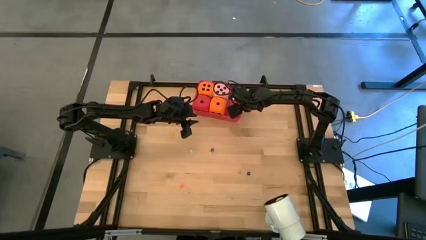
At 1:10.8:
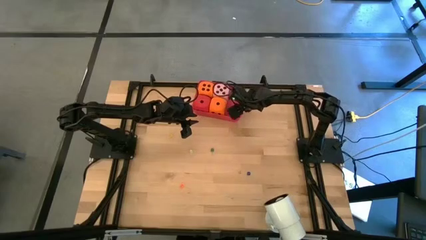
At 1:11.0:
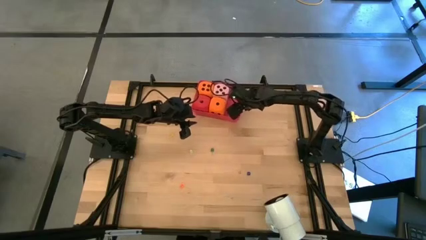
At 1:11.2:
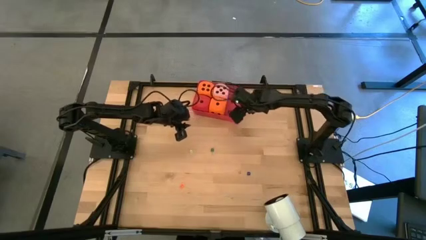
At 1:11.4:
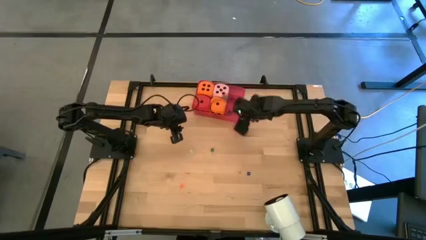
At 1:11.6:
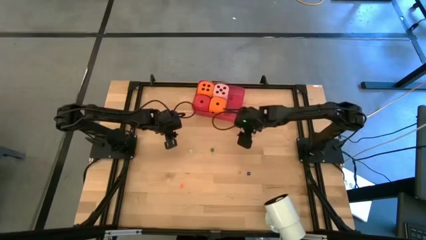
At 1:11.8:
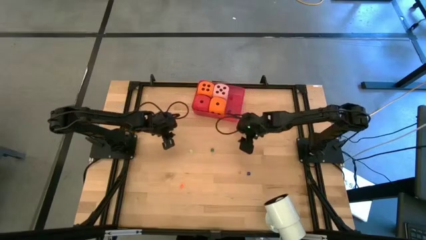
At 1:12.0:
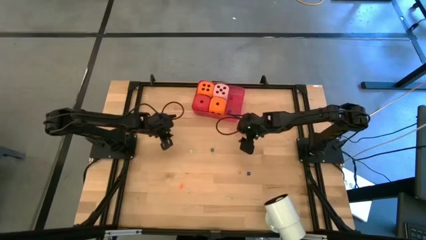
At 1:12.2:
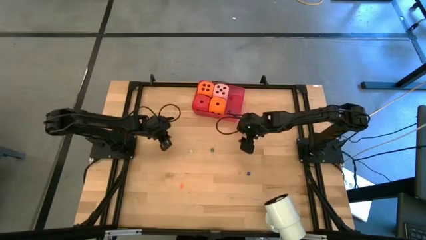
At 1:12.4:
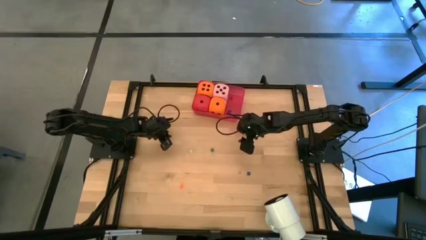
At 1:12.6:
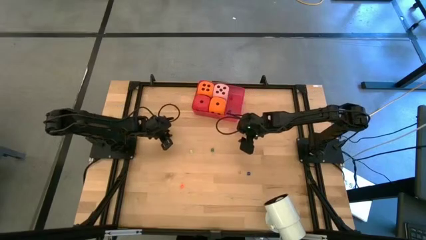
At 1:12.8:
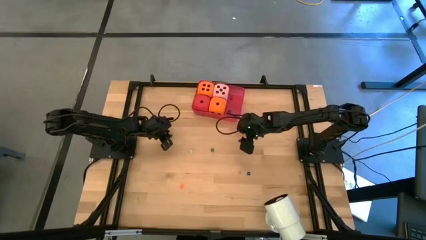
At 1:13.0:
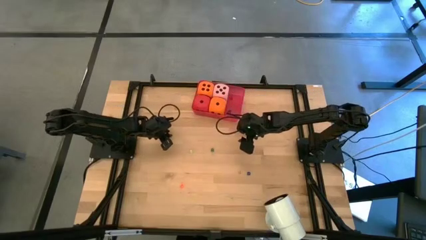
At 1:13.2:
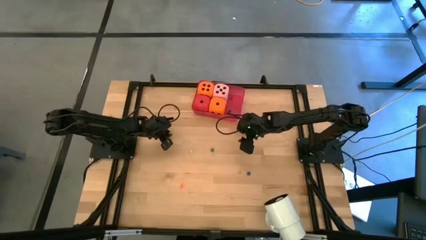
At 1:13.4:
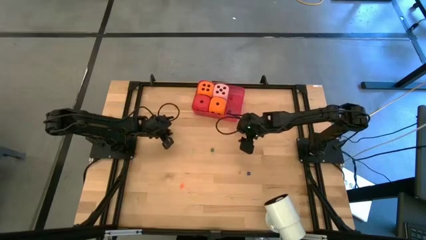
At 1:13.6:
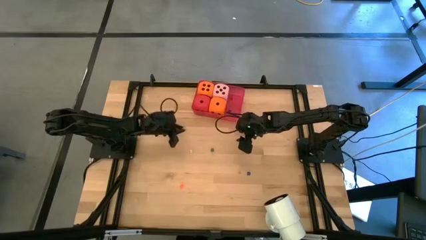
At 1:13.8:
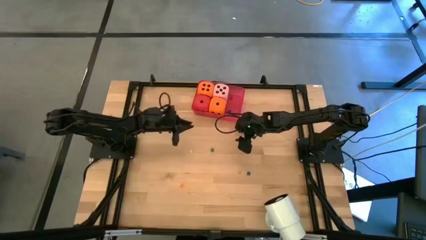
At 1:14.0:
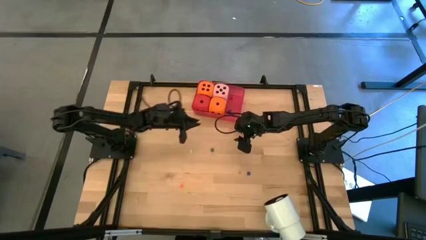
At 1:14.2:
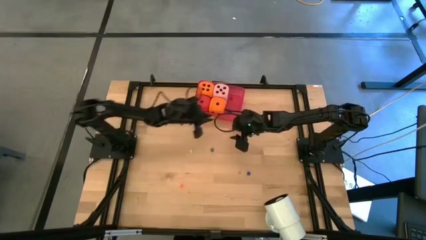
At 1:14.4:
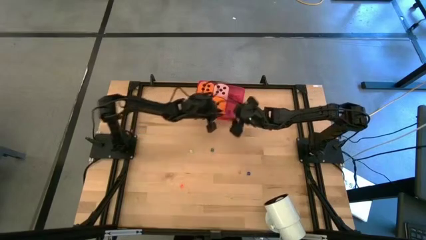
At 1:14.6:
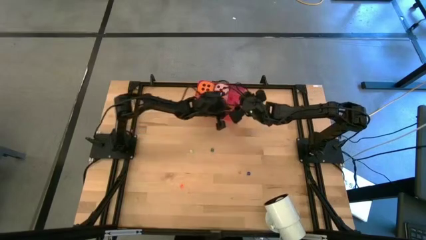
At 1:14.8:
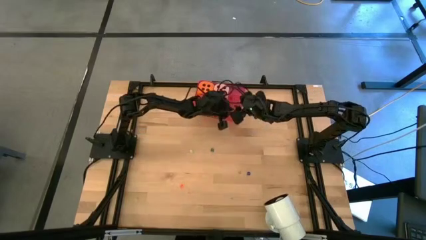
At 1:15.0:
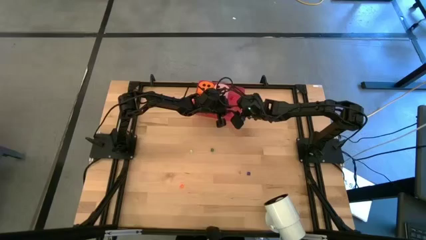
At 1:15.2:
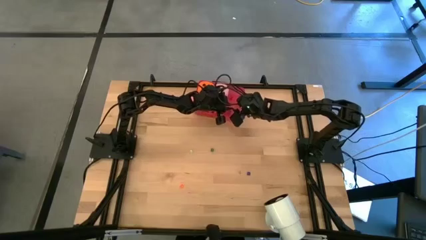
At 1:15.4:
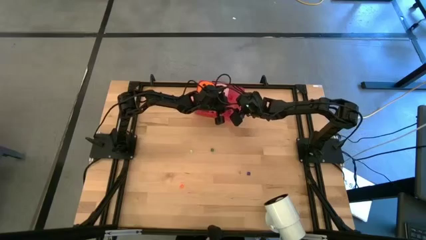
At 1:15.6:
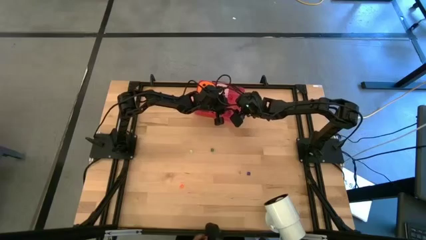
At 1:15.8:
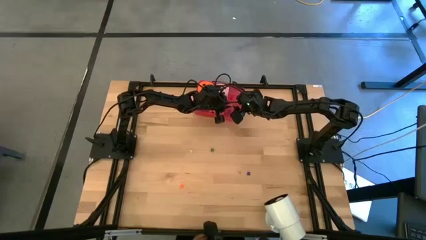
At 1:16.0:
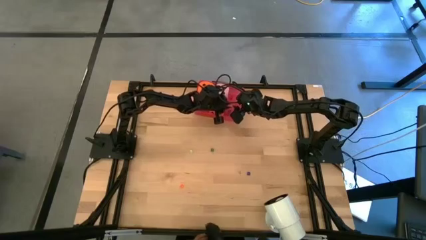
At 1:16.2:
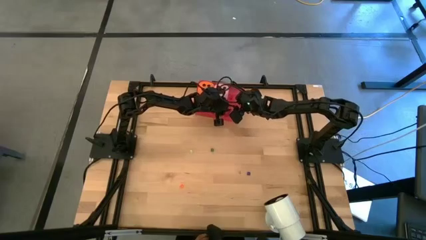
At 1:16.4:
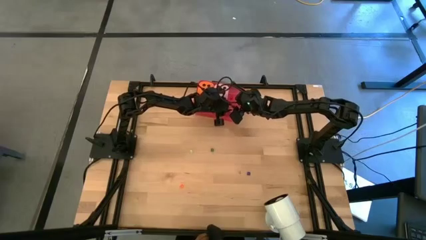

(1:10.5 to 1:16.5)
Task: Pick & Place Dice
Put the small yellow die into the red bin

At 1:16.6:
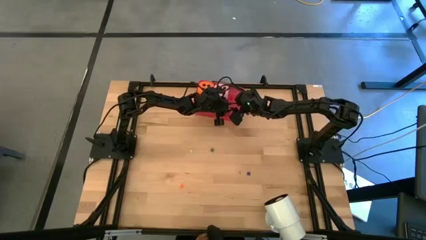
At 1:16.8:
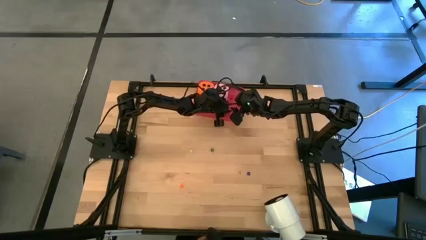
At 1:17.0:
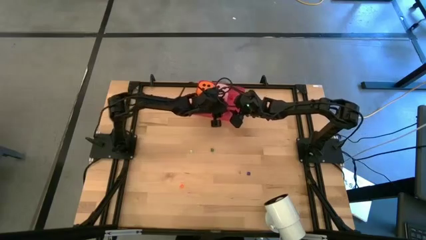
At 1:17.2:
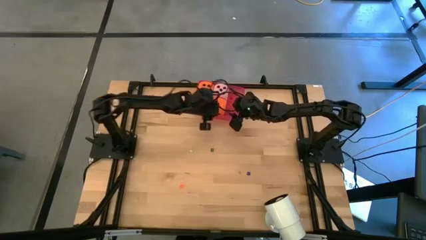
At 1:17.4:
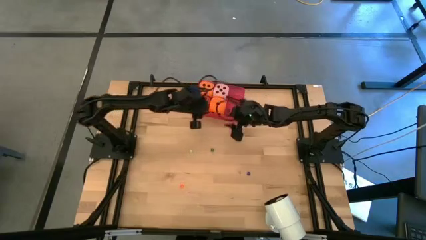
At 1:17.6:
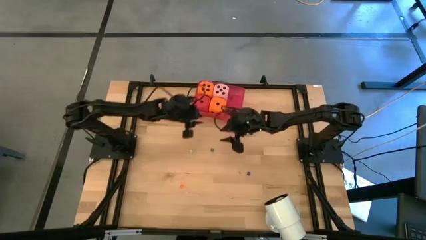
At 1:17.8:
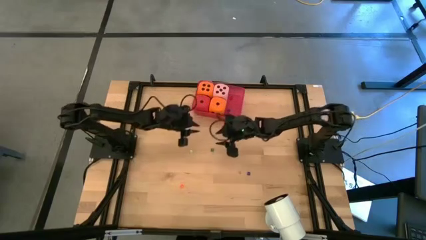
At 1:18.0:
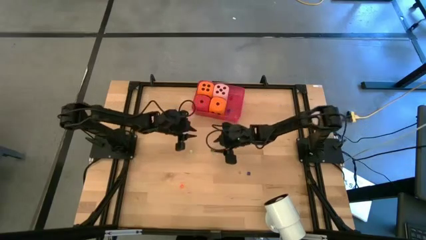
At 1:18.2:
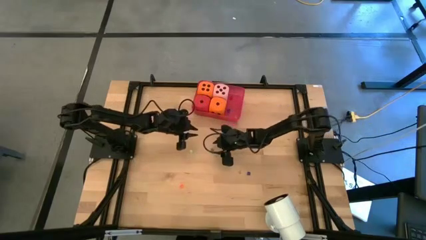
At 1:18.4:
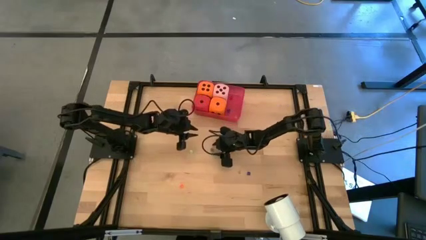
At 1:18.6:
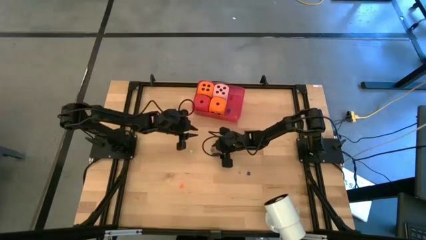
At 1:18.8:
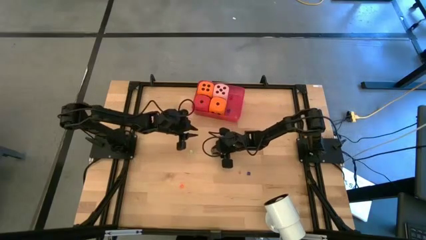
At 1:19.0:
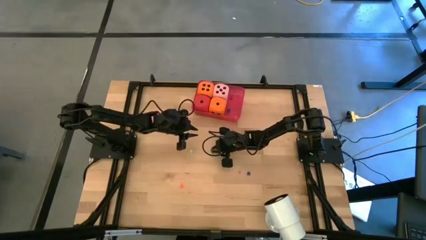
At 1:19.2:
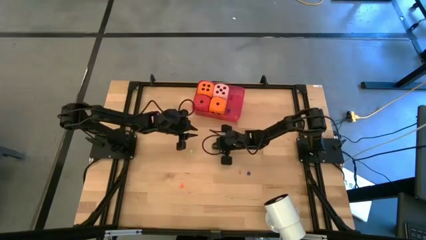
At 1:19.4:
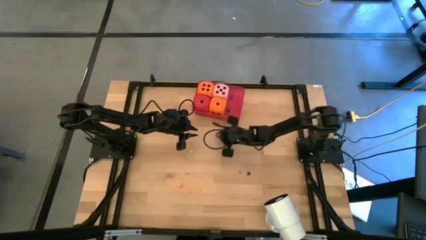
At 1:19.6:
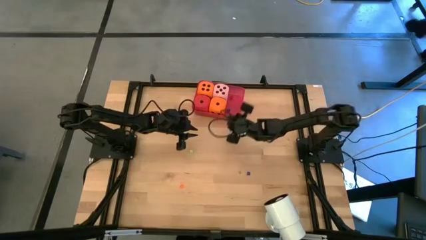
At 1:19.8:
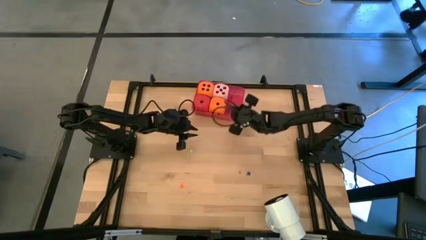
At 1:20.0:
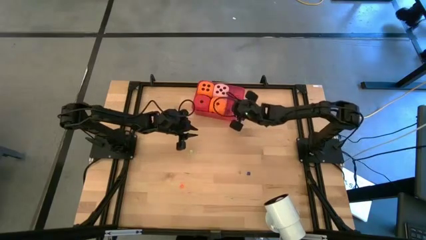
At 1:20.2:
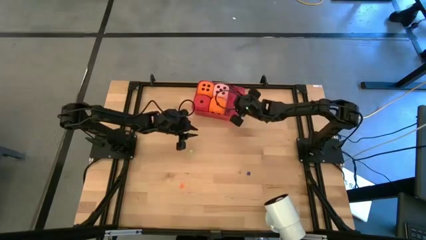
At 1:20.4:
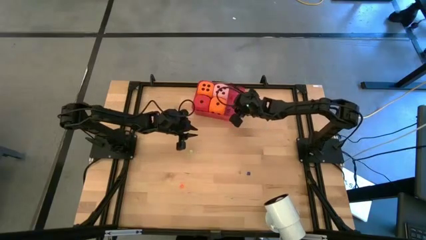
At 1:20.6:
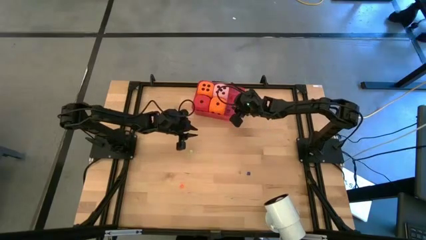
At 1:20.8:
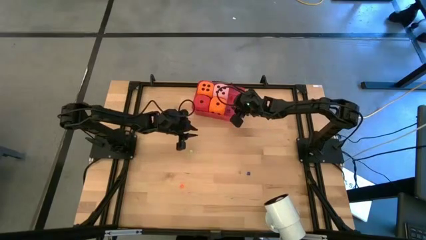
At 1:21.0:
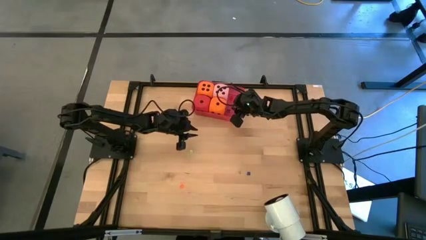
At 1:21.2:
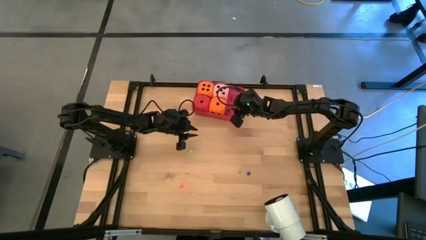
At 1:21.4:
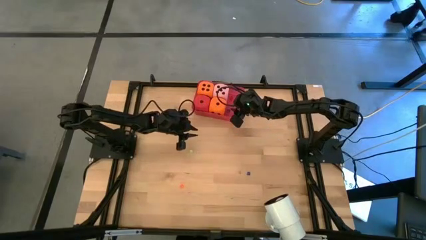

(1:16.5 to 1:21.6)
Put the small green die into the red bin

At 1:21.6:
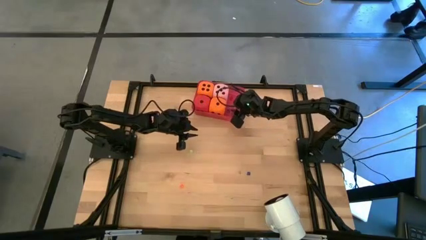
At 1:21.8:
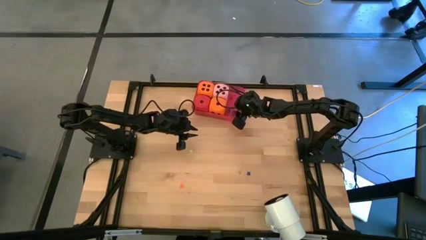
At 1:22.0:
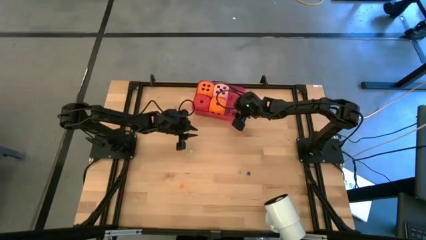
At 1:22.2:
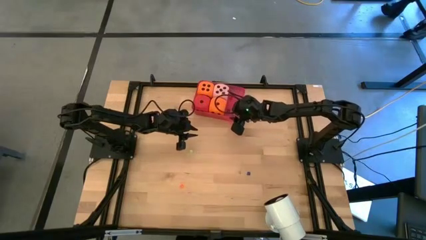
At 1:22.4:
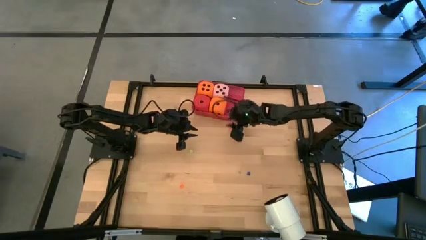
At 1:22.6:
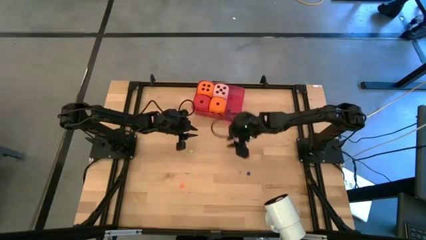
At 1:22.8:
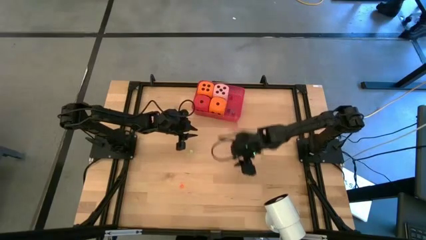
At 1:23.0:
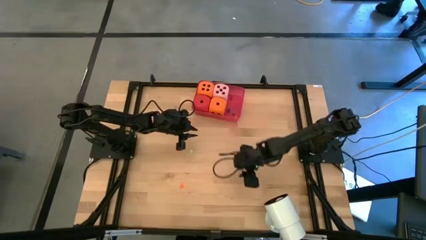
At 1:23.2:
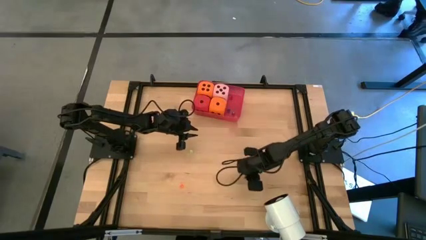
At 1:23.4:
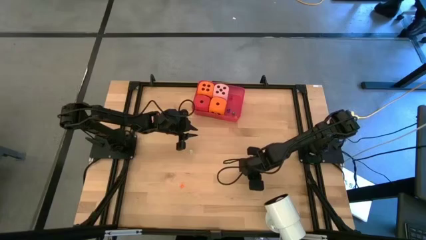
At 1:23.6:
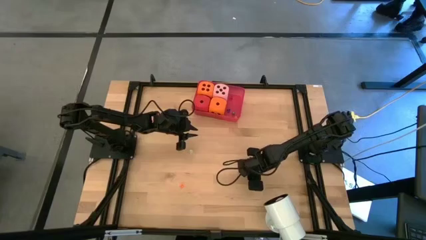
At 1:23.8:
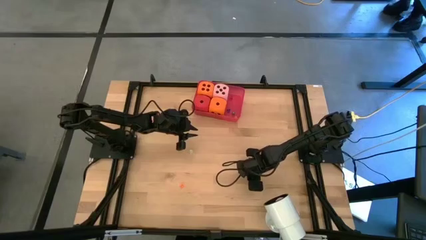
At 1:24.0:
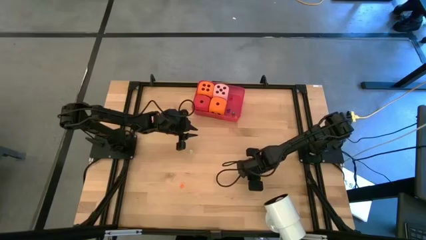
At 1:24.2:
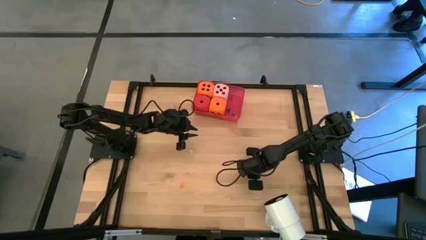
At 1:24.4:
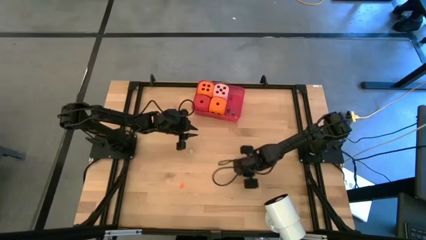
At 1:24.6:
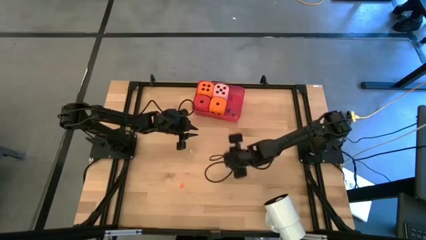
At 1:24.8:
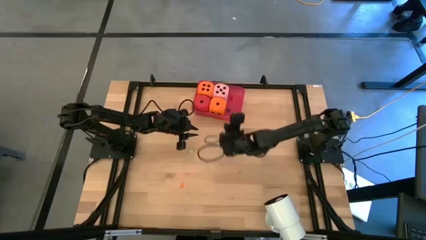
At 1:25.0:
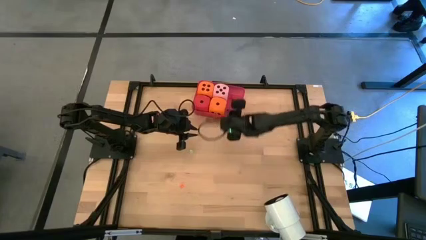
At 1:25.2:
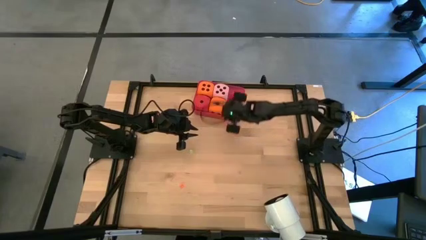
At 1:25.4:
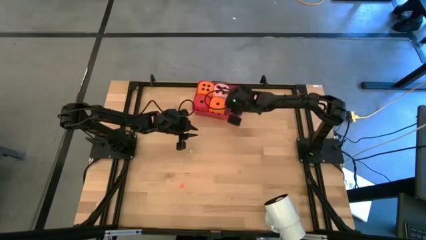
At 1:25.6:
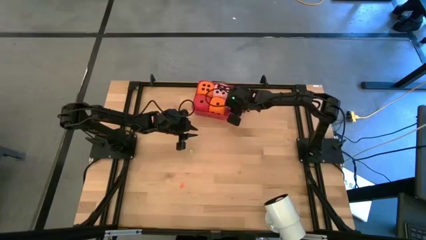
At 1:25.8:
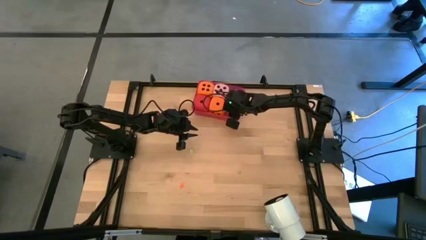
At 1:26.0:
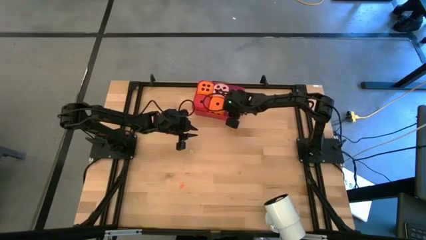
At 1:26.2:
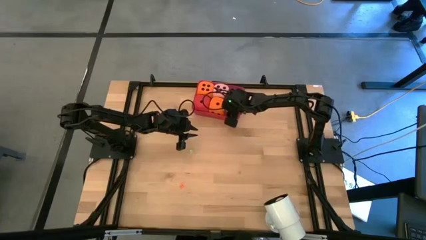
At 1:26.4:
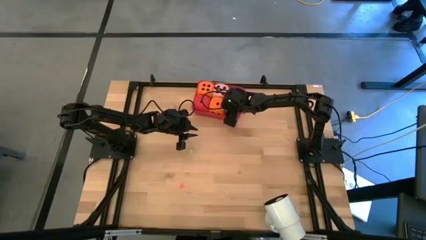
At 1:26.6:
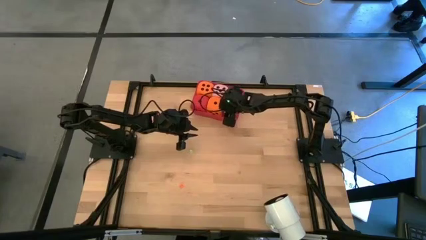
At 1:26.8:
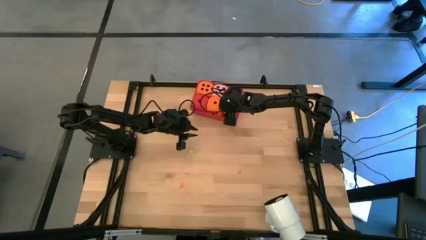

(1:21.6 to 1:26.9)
Put the small blue die into the red bin
